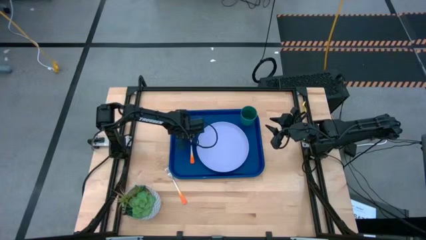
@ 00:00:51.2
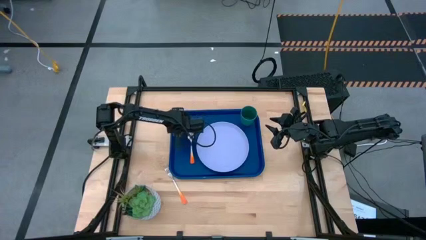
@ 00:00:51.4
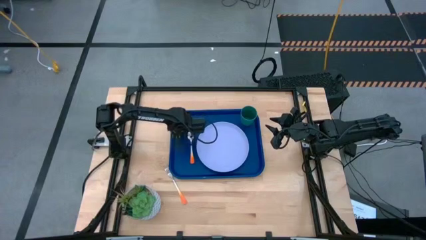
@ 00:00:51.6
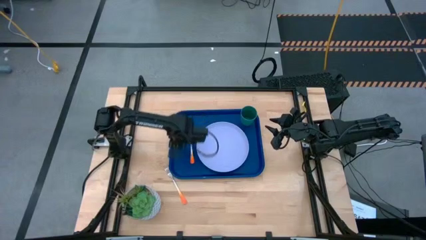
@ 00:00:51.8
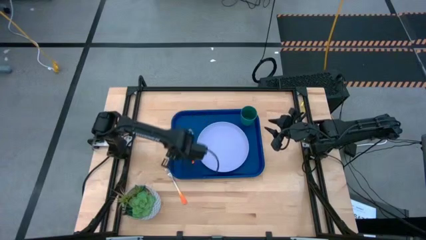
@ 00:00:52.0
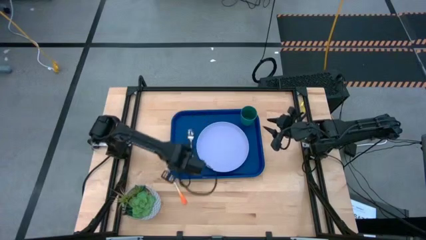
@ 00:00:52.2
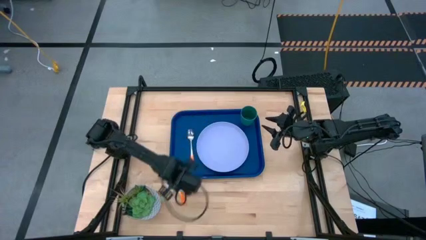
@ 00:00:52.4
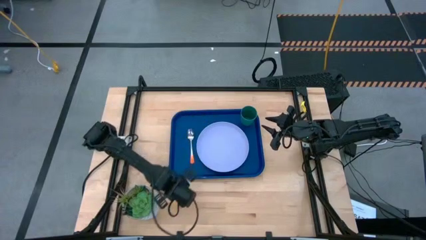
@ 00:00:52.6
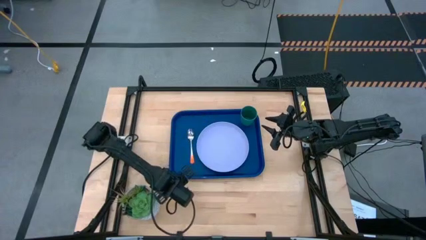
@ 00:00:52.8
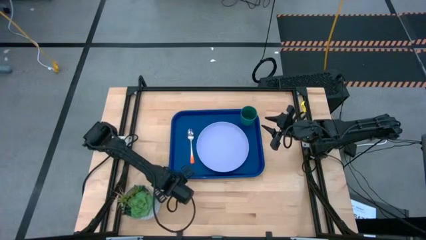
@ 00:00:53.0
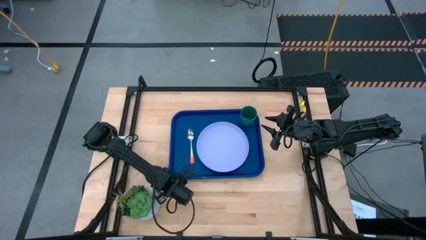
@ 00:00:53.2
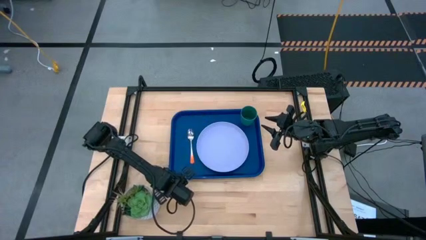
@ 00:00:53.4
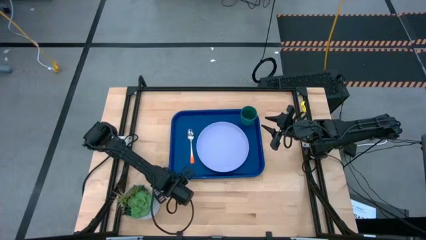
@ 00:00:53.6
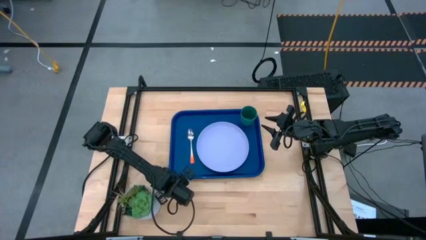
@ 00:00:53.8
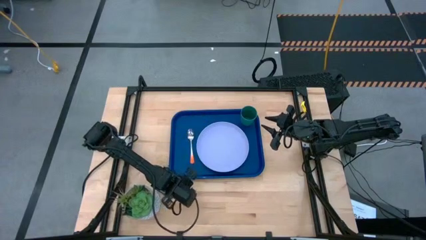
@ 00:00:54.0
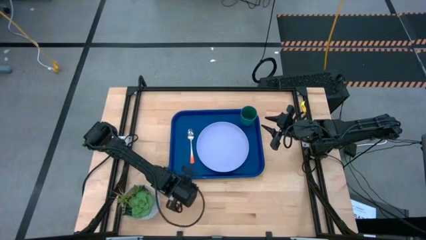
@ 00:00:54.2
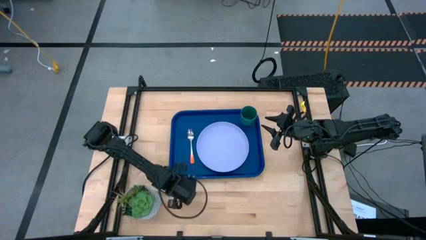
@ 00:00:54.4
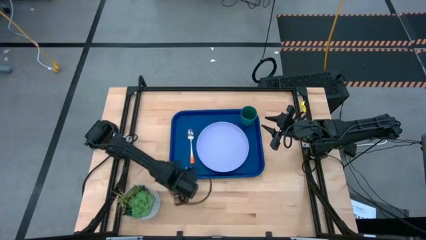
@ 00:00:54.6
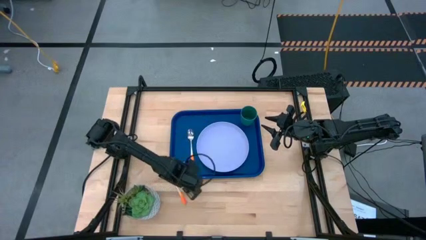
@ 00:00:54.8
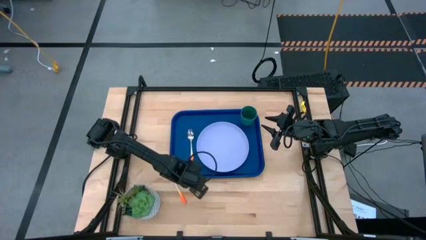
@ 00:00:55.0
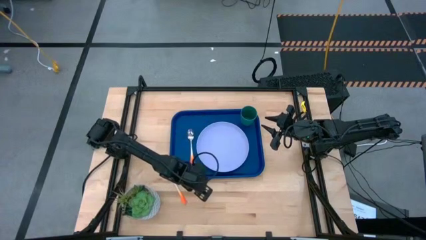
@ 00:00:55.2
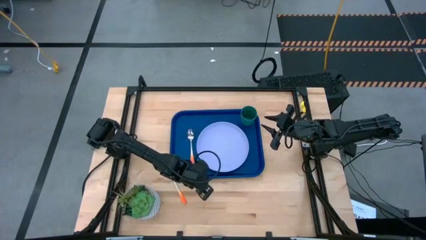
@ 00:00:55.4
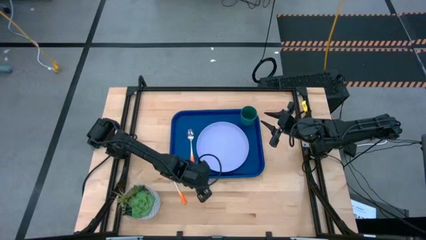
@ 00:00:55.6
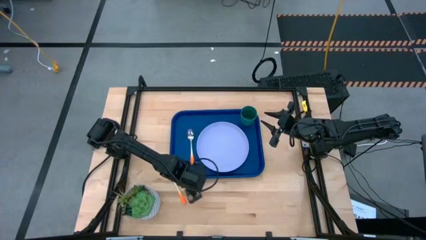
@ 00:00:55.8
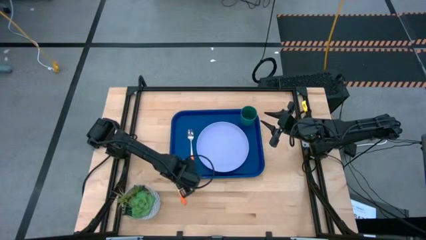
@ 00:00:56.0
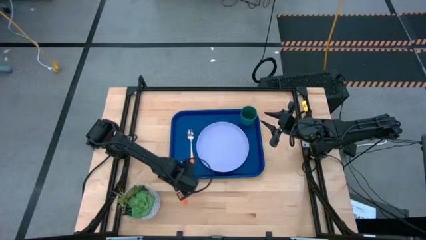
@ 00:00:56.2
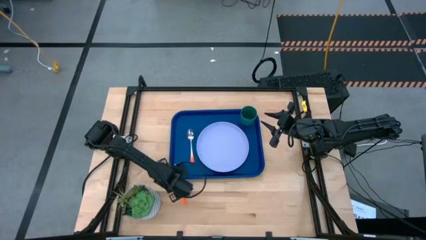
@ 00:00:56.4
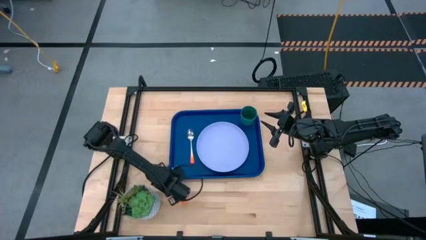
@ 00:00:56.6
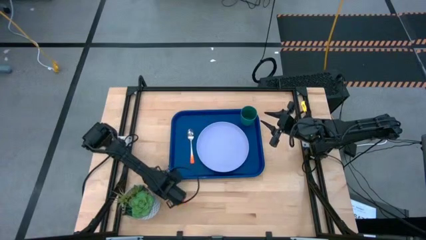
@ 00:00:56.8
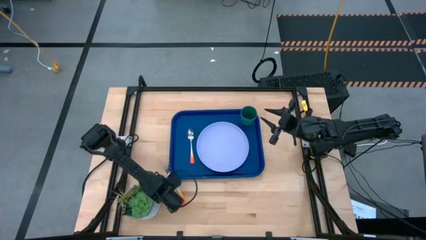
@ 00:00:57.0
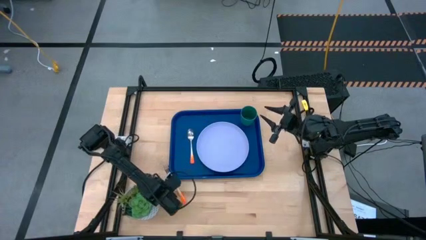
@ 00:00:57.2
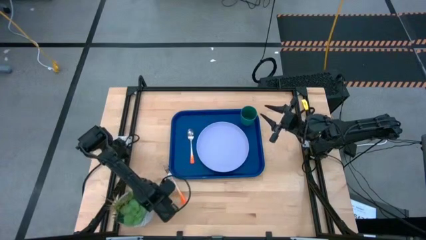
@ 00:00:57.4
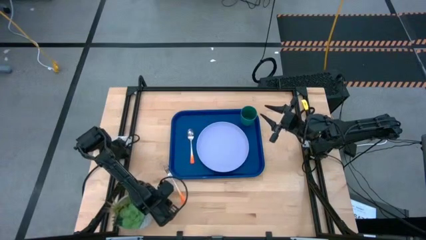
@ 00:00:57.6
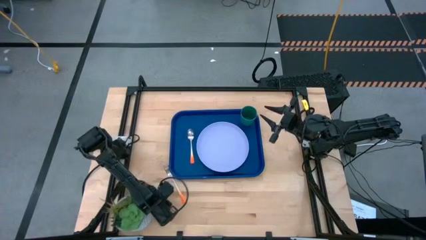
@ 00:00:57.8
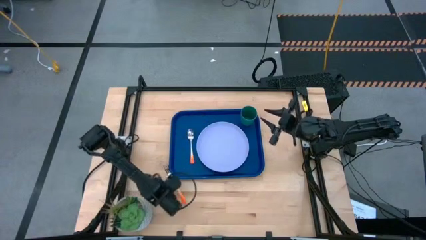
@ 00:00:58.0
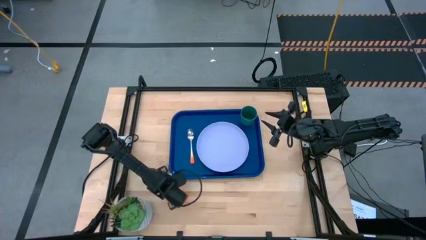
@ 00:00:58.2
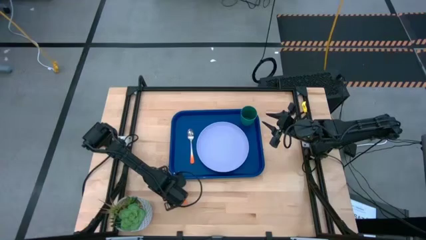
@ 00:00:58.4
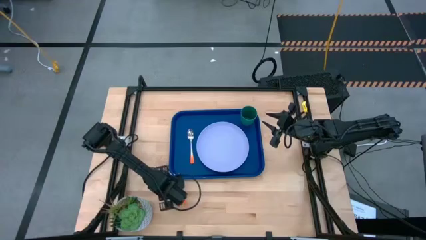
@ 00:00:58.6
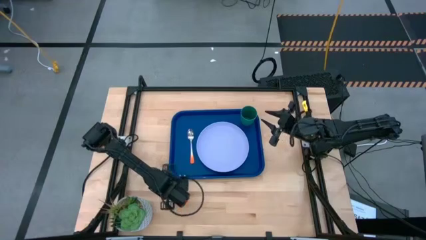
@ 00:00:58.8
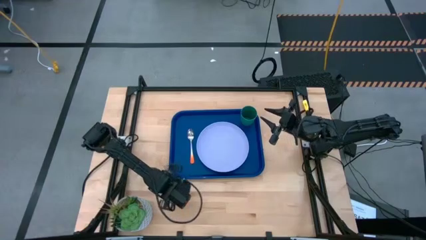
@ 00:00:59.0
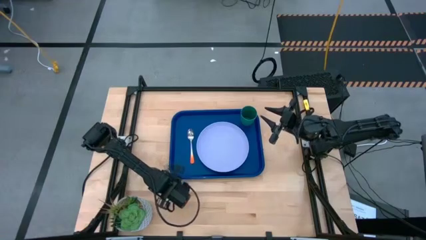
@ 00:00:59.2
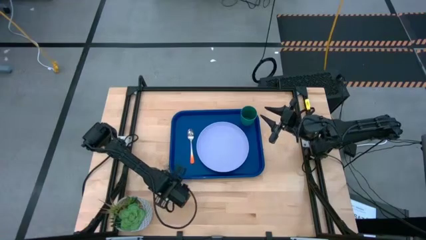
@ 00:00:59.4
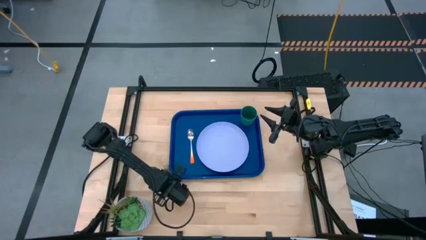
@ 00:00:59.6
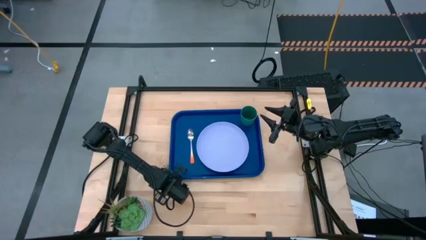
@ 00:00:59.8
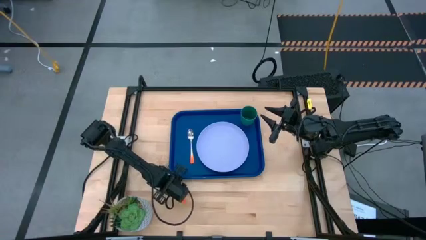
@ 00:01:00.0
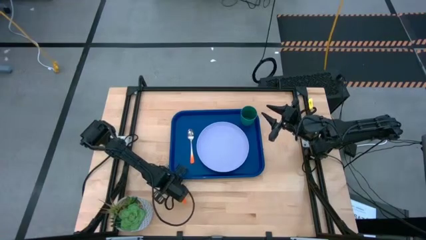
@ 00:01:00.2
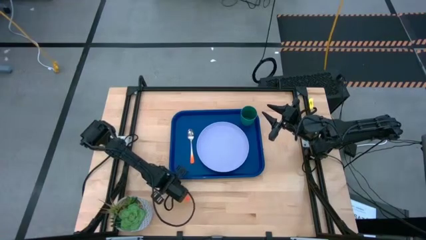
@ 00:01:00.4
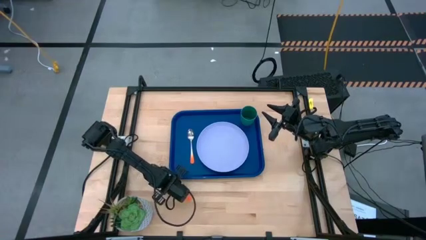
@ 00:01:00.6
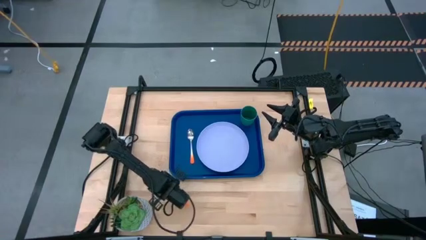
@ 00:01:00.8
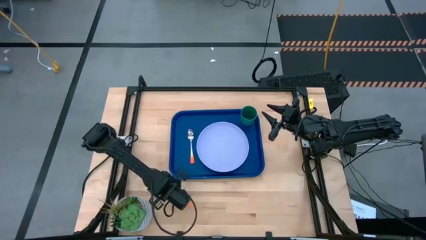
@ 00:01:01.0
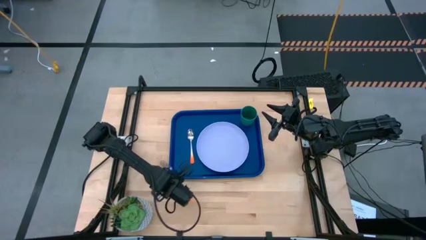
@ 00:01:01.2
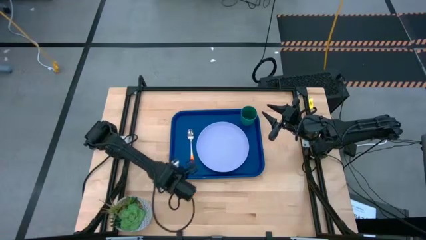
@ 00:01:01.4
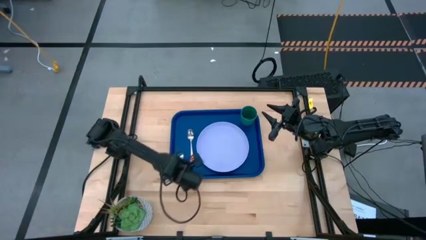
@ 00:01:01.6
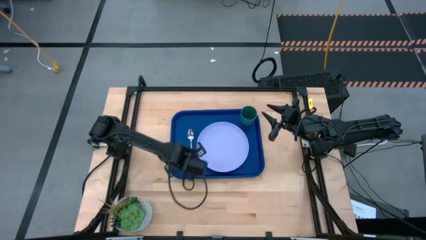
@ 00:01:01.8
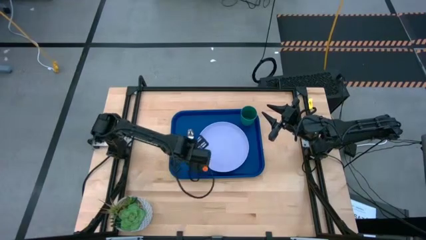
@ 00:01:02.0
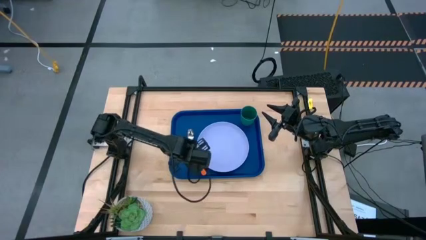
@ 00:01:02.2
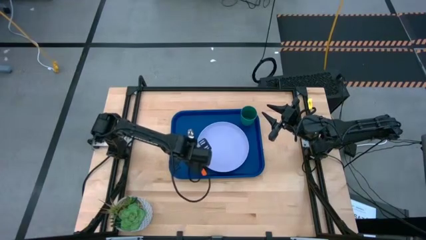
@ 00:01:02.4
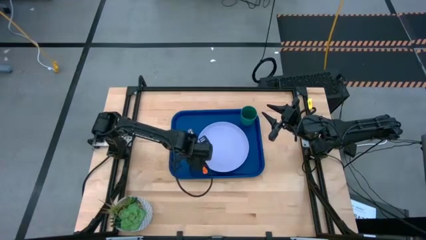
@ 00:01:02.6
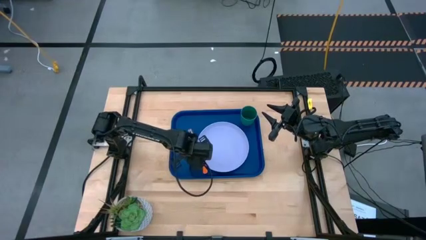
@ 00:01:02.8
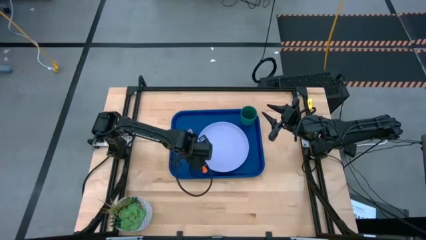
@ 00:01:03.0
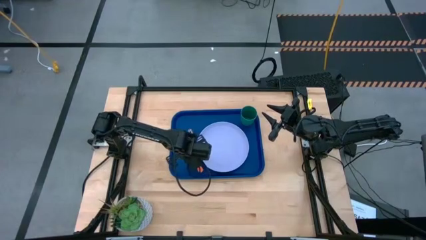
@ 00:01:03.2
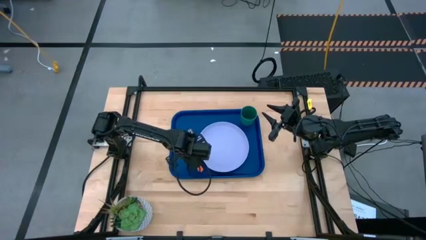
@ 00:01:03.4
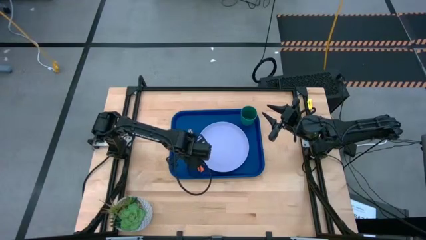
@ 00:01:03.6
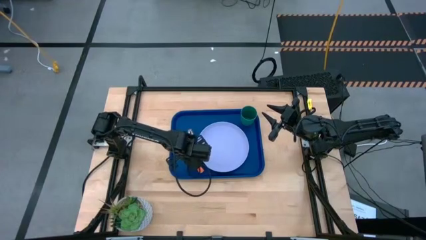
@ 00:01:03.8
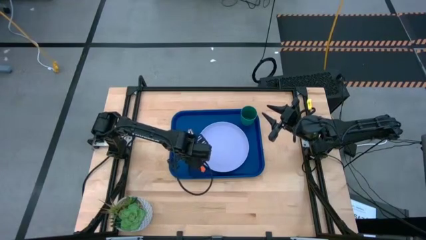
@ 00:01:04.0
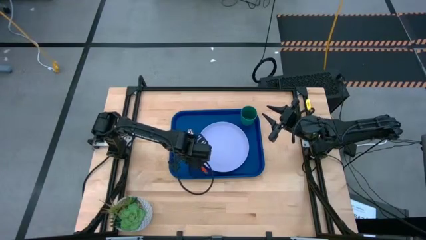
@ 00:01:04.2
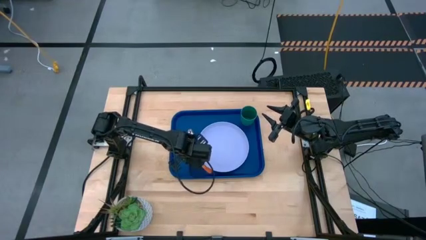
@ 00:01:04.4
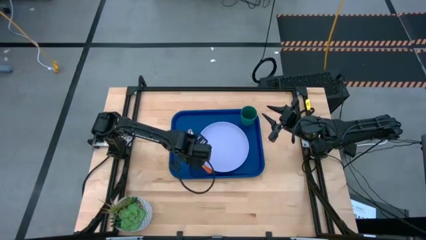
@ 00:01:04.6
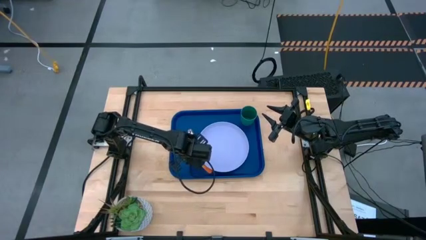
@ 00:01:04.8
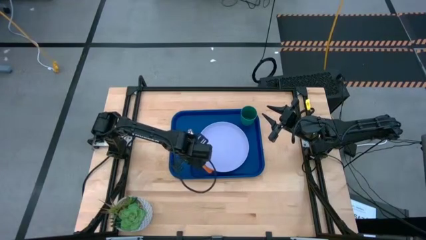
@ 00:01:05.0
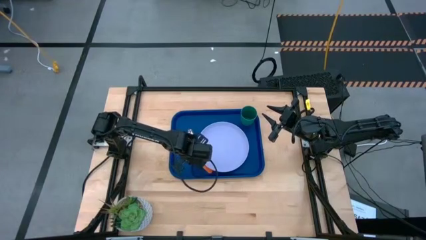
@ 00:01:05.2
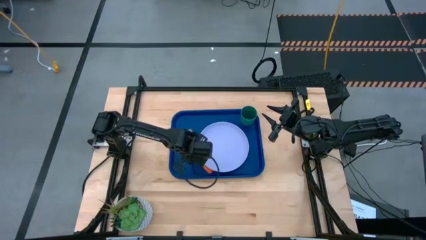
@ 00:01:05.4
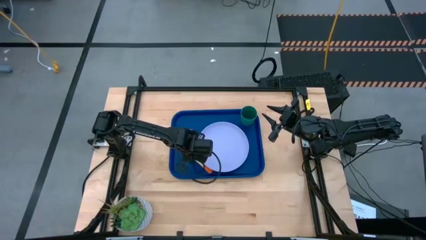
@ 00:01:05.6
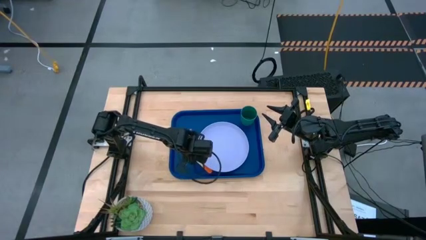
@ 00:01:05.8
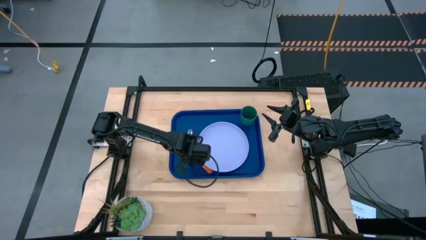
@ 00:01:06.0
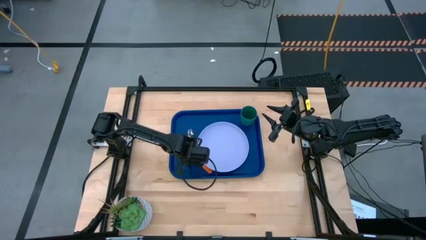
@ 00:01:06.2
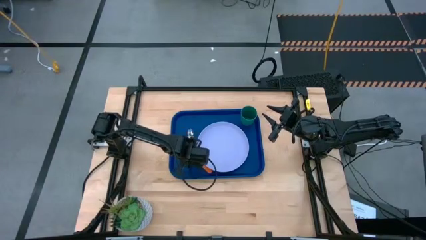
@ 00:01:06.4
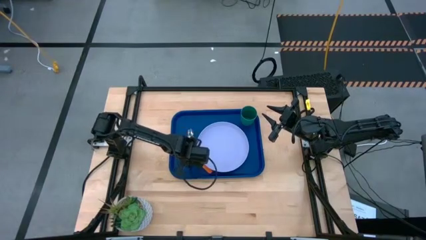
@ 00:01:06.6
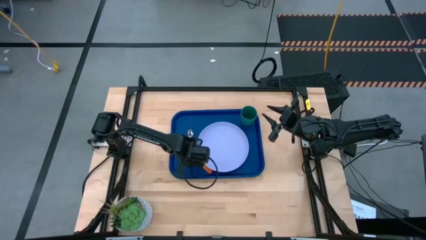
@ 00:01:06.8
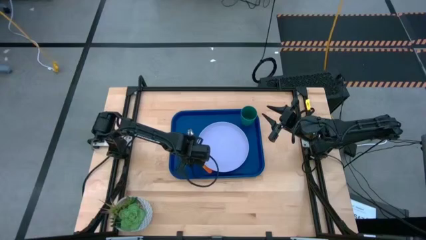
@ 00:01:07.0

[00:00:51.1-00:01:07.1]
Task: Pick and place plate/cup/fork/spoon on tray
Put the orange fork to the left of the orange spoon on the blue serving tray
